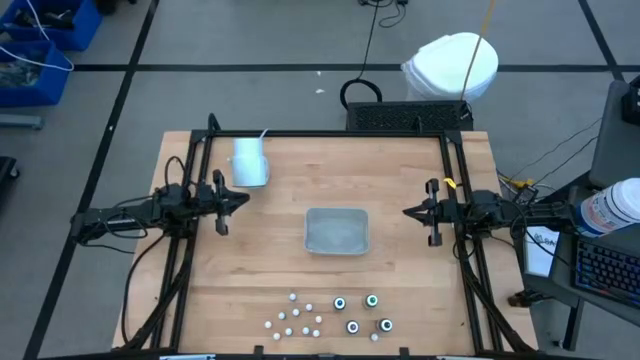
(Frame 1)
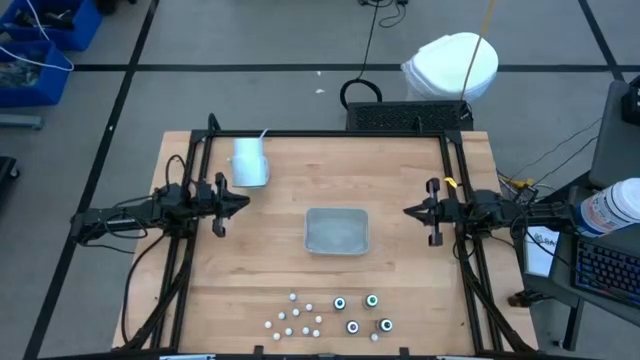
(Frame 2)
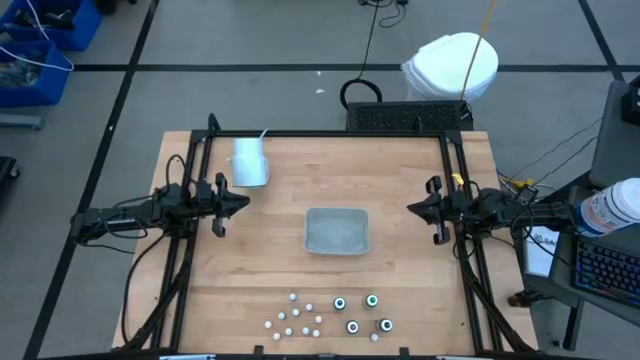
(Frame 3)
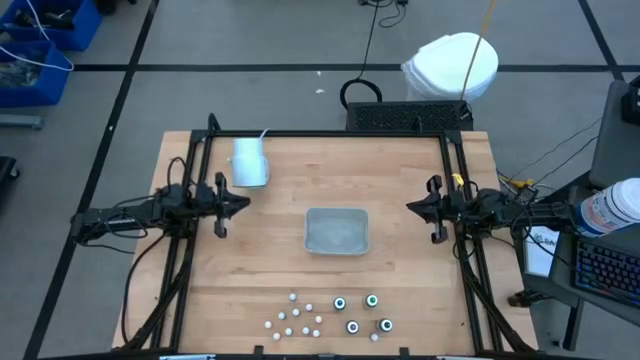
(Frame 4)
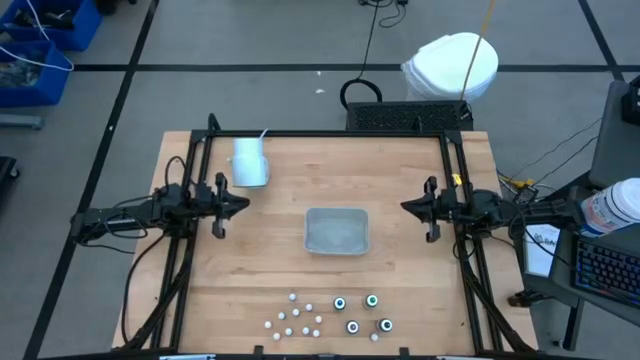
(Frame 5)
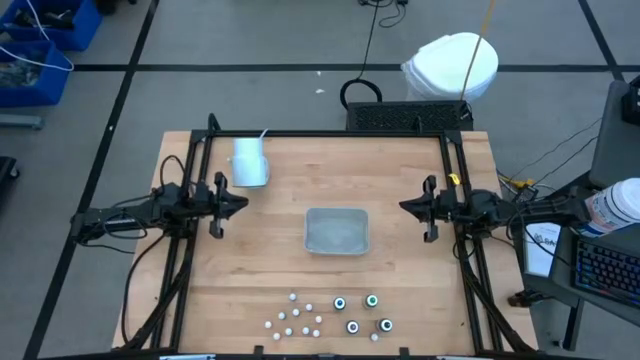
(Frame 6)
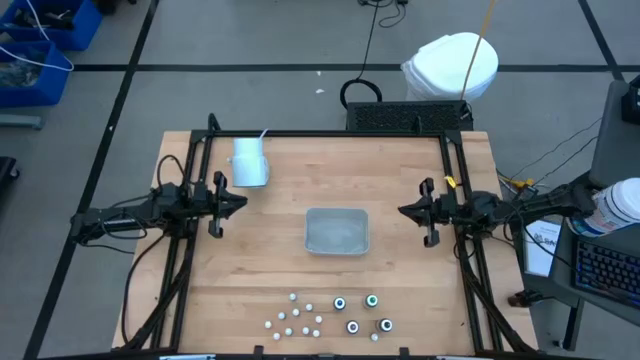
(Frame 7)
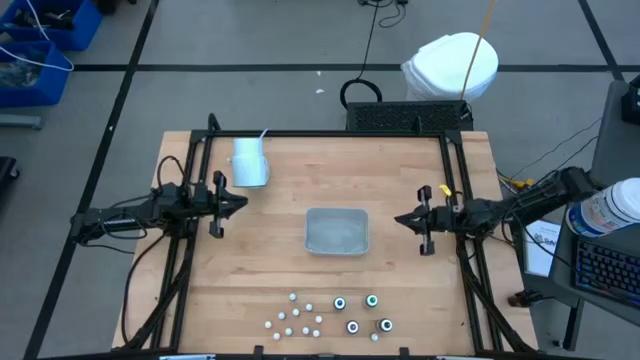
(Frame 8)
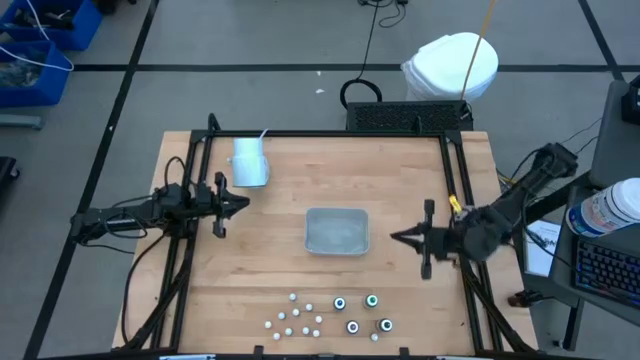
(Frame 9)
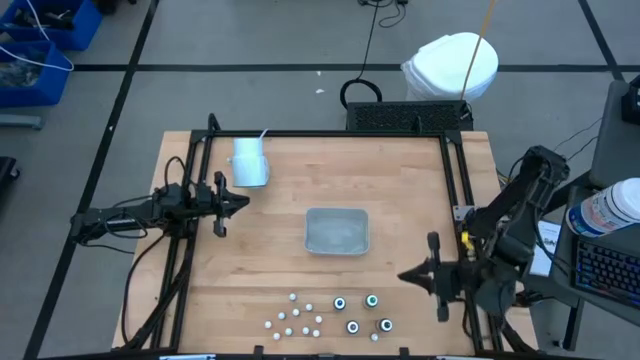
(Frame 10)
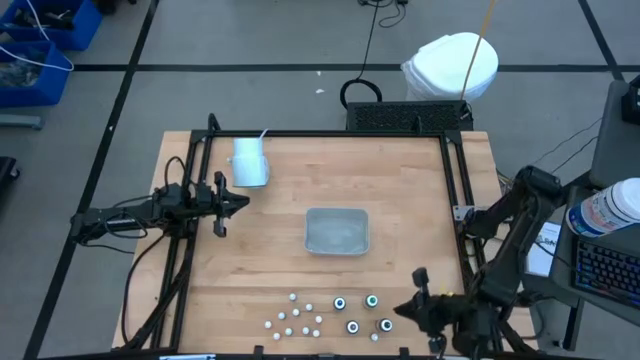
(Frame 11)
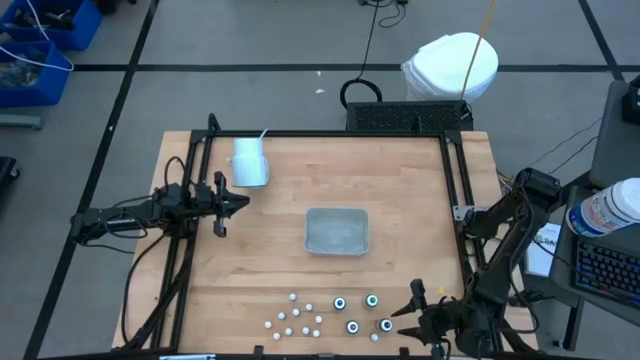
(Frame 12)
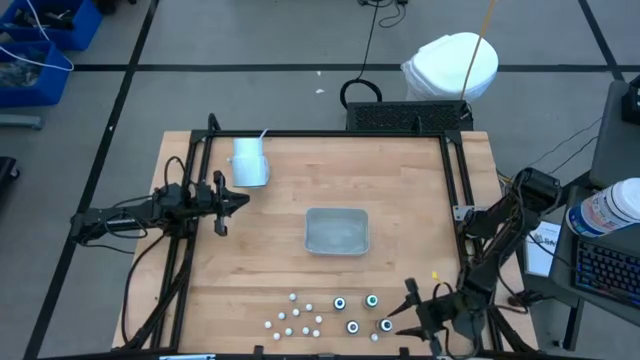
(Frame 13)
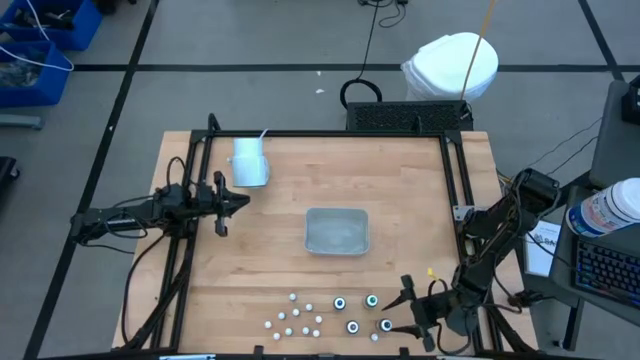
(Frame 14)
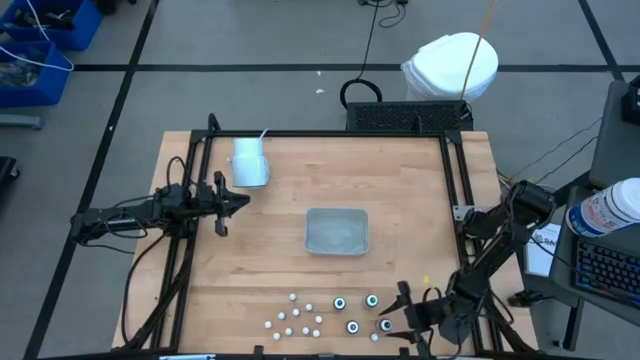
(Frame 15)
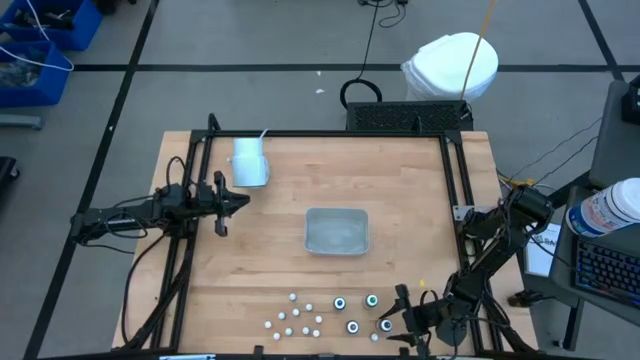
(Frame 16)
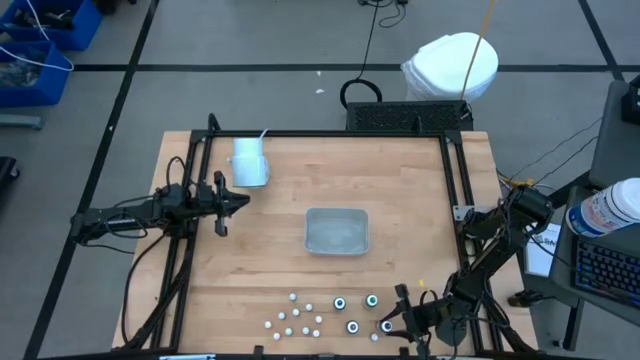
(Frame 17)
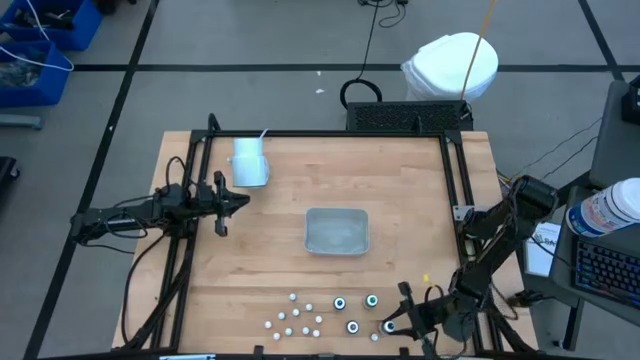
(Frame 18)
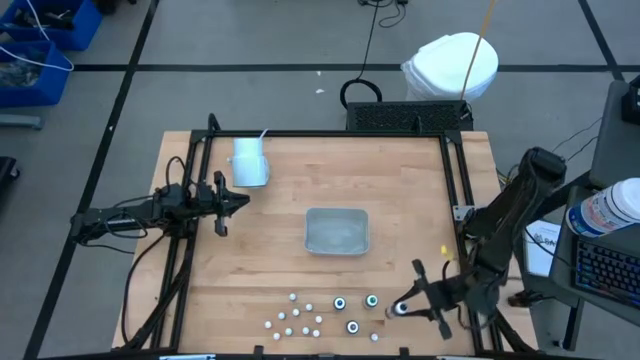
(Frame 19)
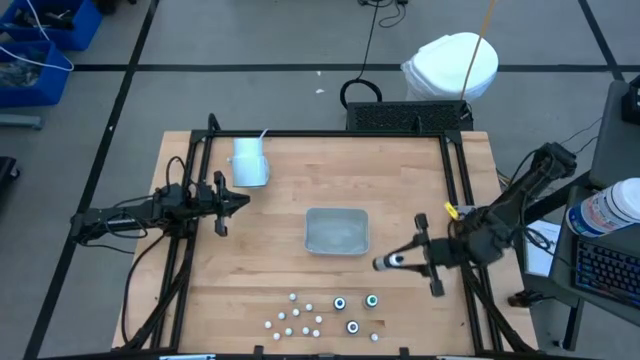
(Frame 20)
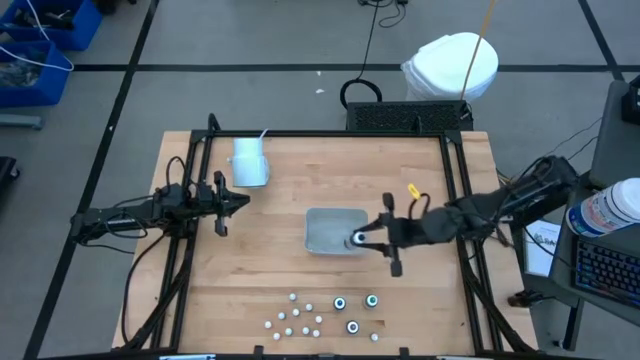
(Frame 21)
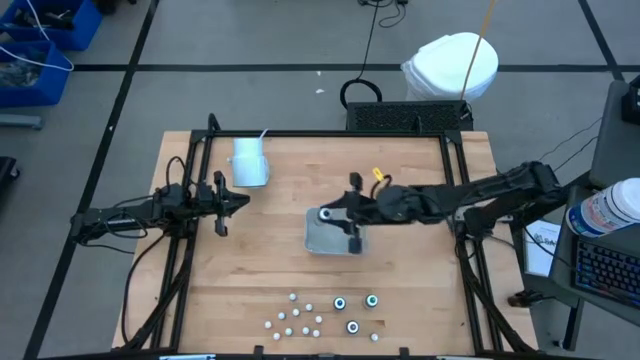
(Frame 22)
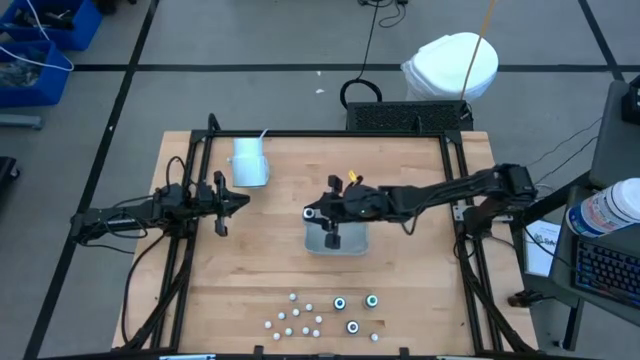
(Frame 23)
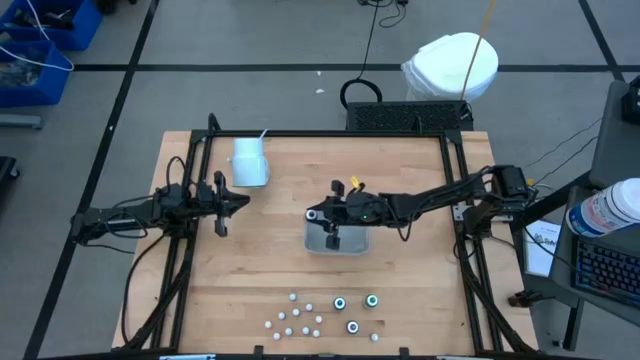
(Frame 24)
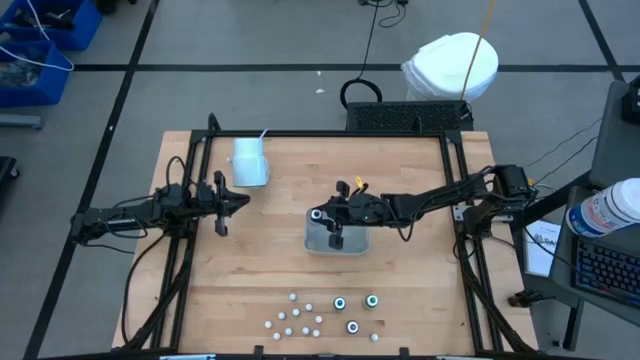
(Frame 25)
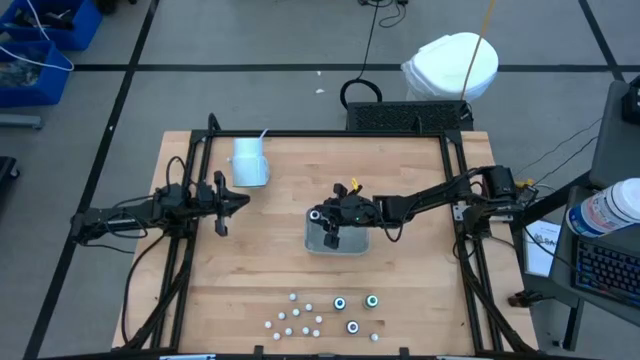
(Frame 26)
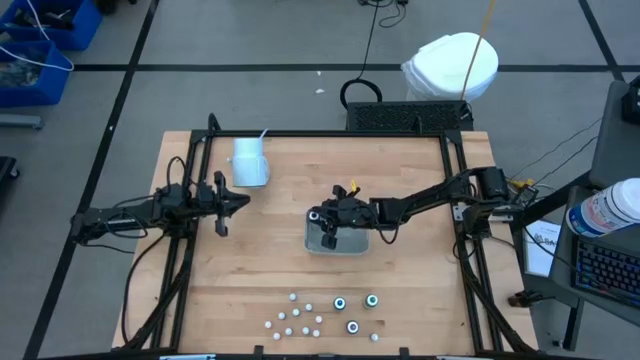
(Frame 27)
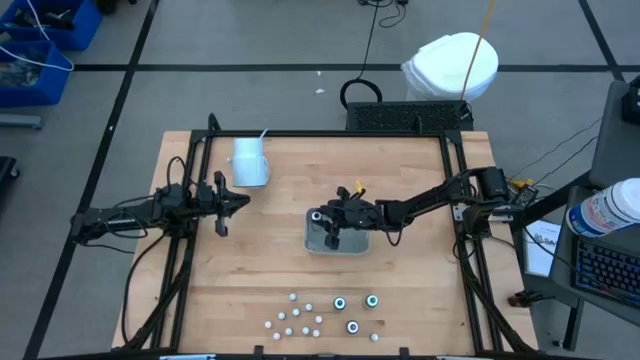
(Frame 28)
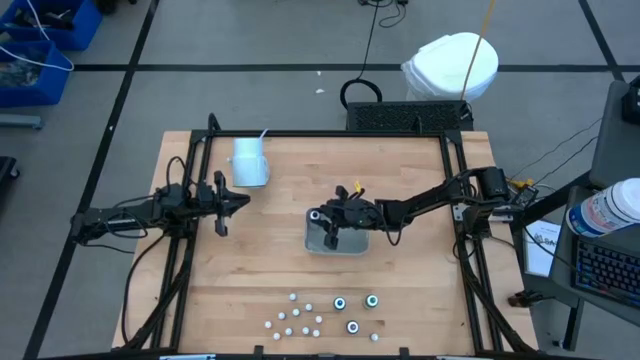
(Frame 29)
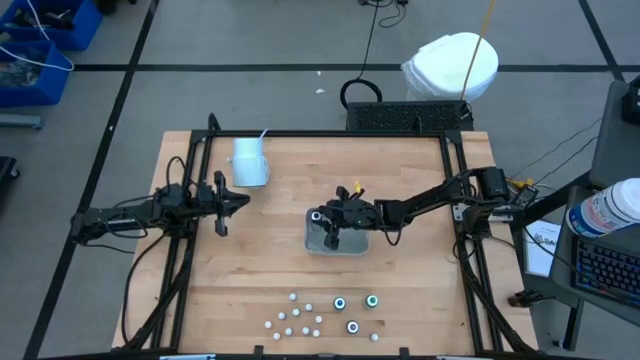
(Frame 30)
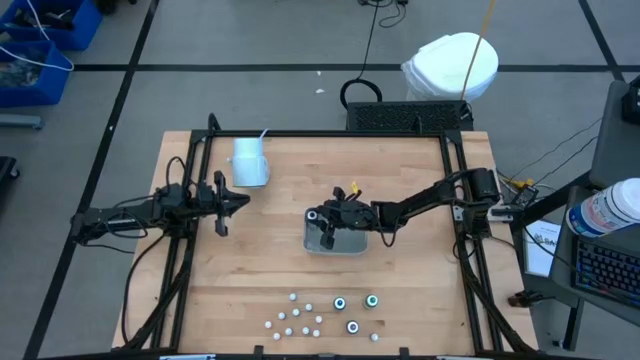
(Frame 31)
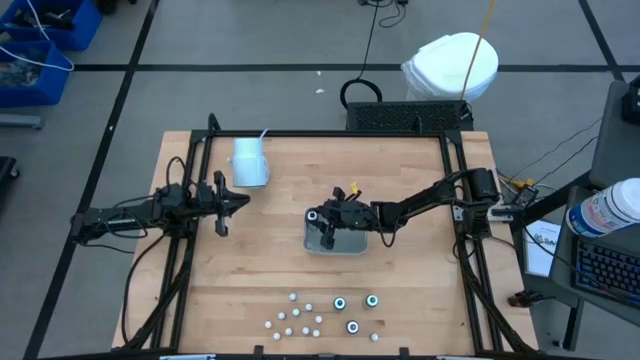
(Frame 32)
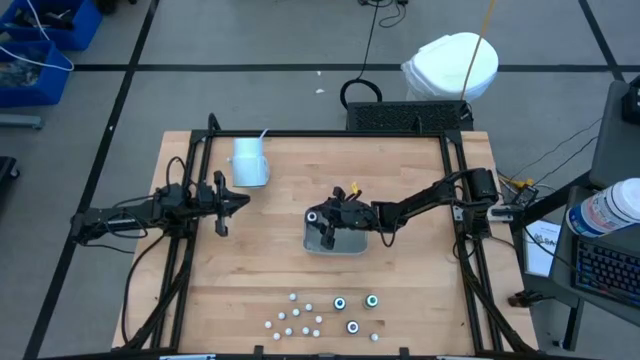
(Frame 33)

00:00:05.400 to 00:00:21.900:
Task: Pick & Place food coloring
Put the large black food coloring bottle into the white container

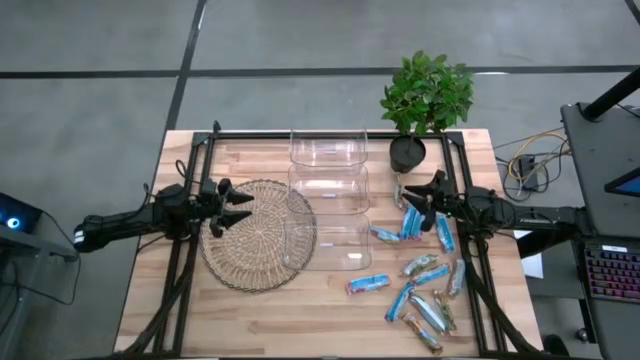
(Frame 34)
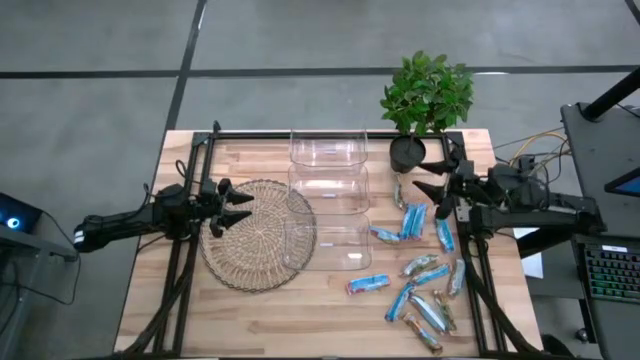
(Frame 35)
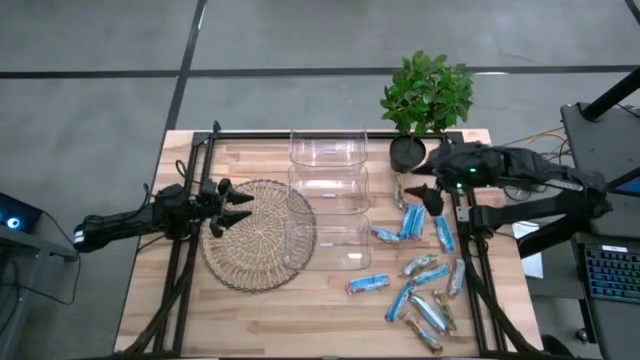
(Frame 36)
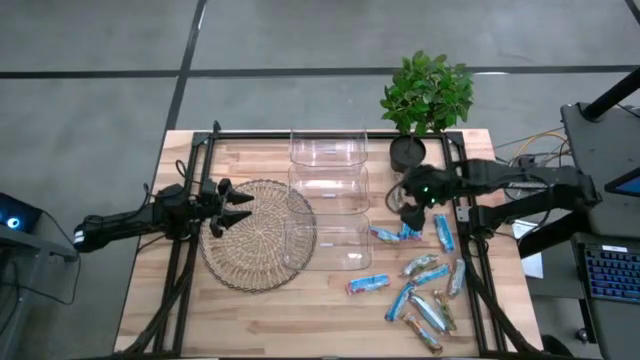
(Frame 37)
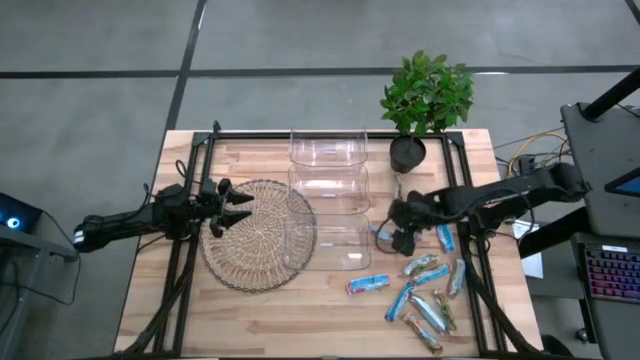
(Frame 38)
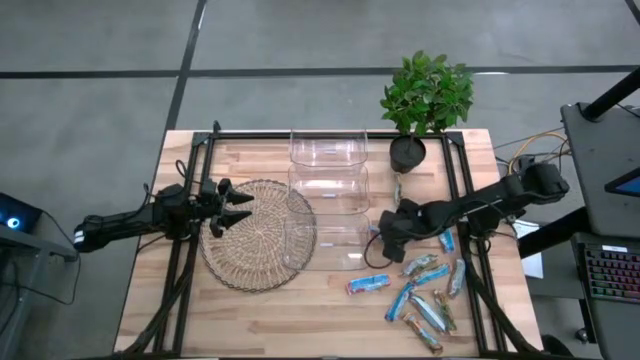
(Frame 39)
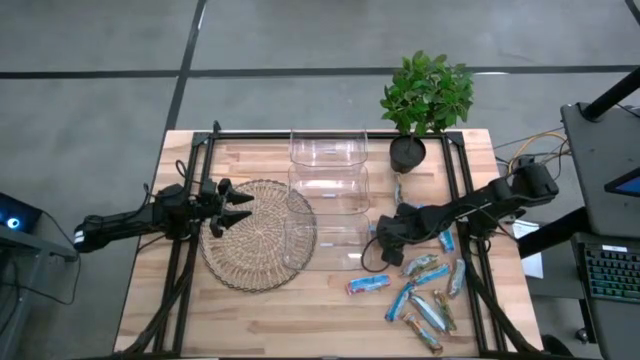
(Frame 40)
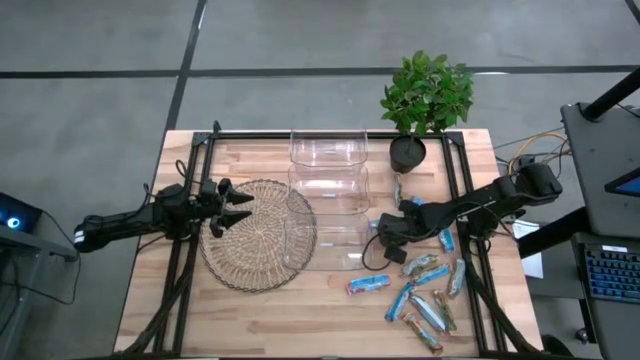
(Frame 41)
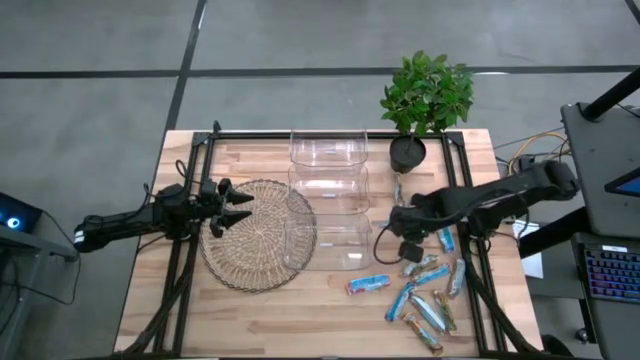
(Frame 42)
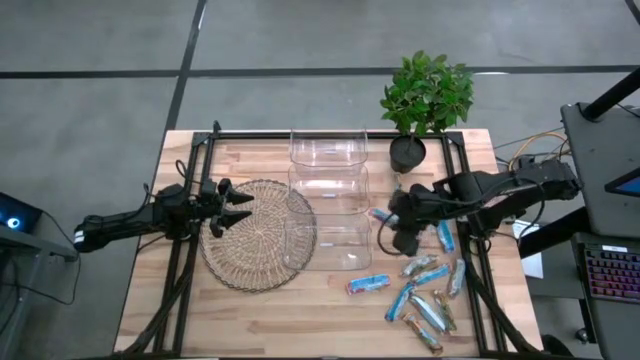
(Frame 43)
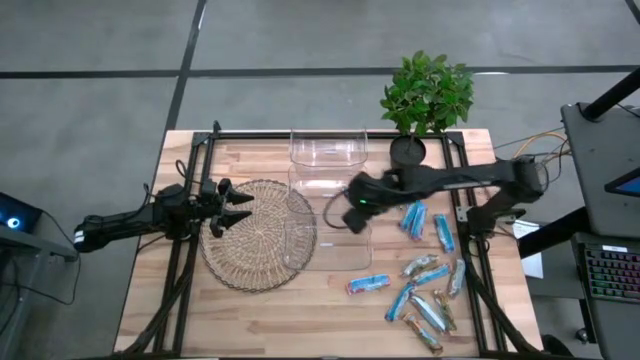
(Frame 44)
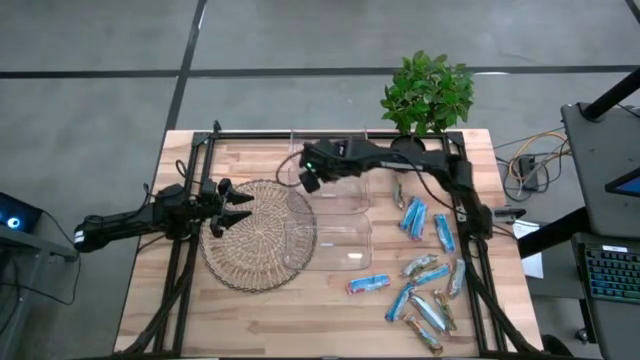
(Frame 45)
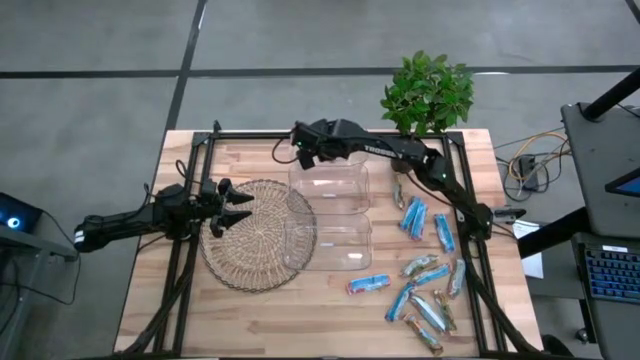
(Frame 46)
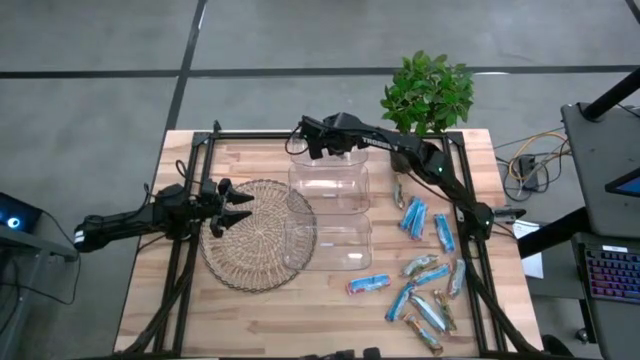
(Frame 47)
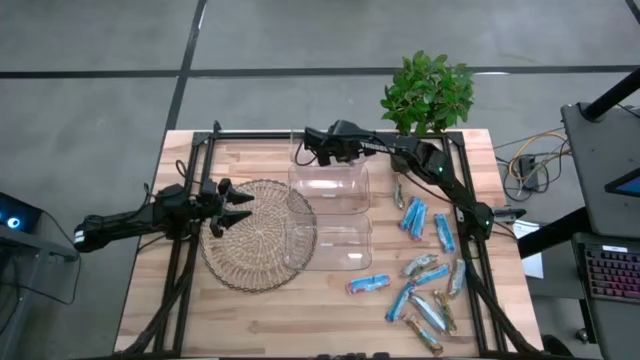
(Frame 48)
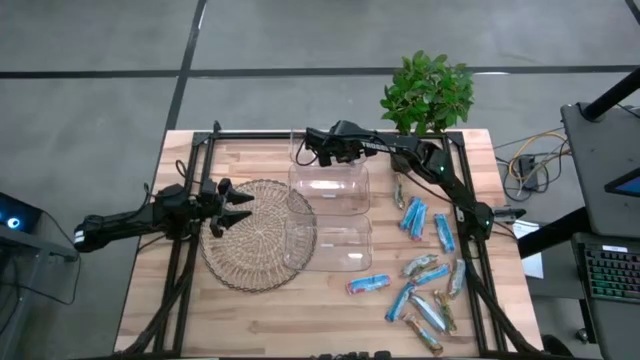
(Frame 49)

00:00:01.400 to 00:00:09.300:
Task: Pick and place Granola Bars by type
Put the red granola bar into the top transparent bin
